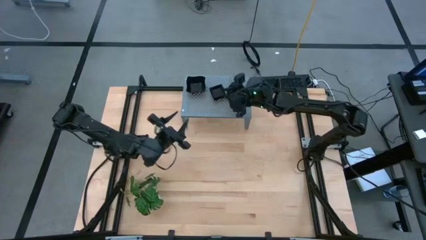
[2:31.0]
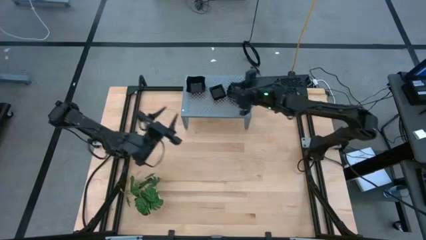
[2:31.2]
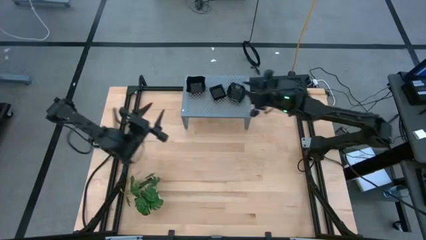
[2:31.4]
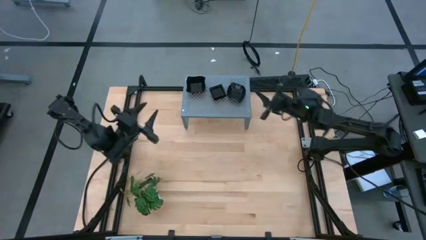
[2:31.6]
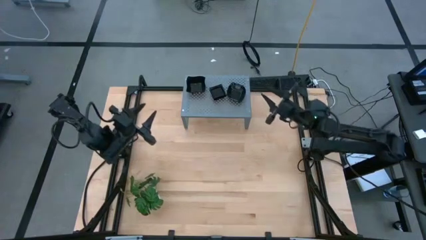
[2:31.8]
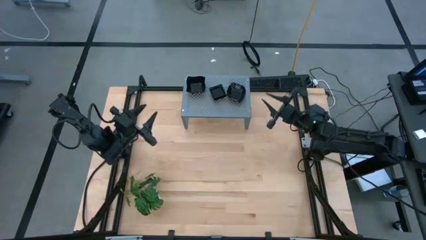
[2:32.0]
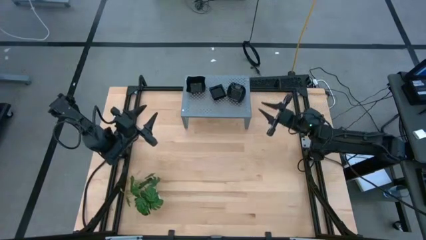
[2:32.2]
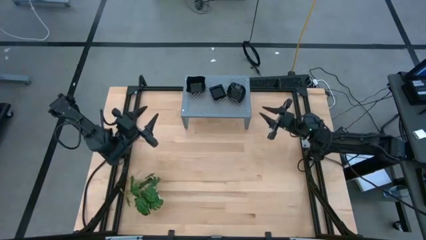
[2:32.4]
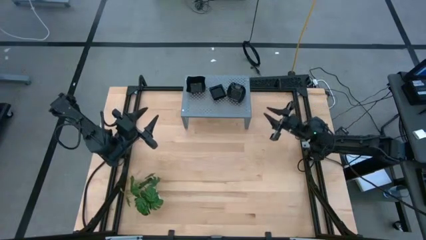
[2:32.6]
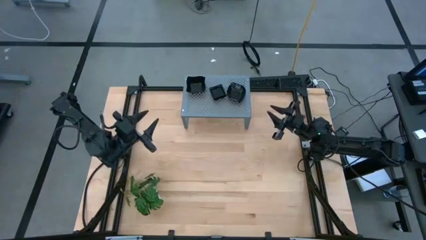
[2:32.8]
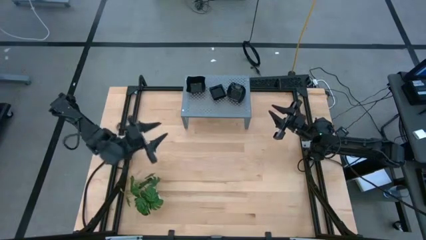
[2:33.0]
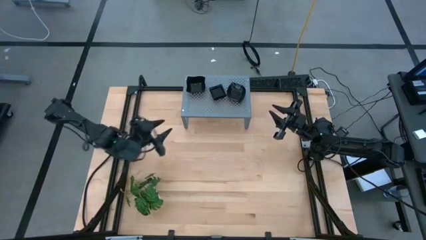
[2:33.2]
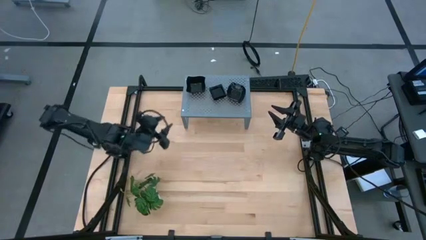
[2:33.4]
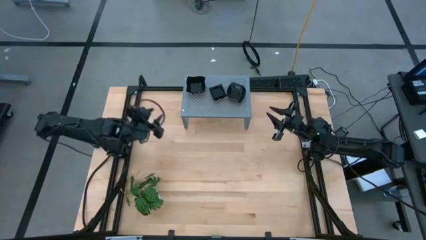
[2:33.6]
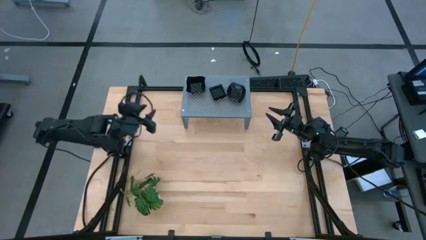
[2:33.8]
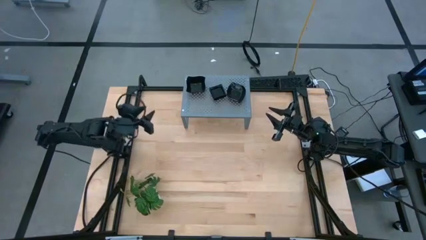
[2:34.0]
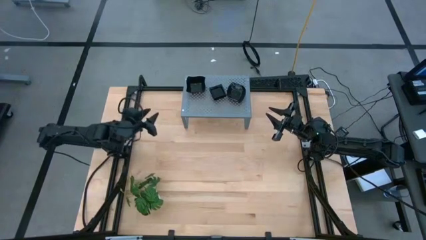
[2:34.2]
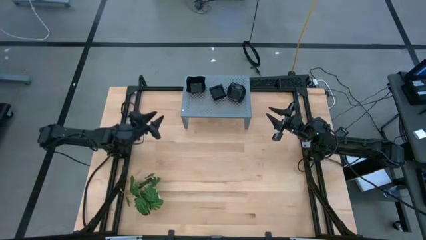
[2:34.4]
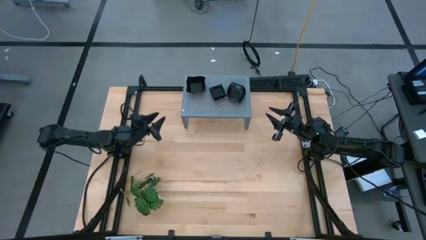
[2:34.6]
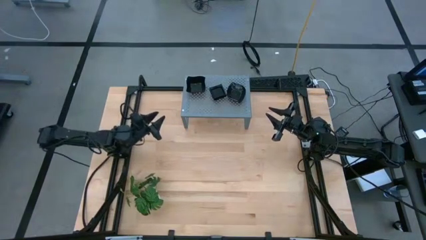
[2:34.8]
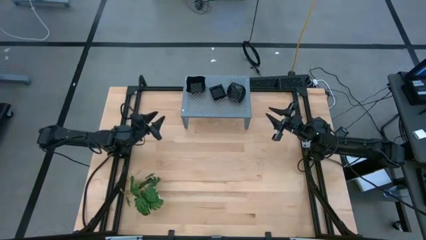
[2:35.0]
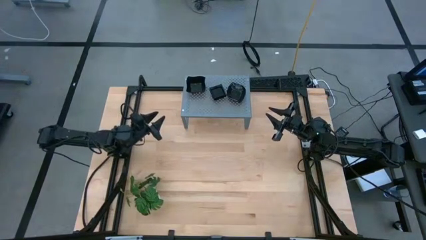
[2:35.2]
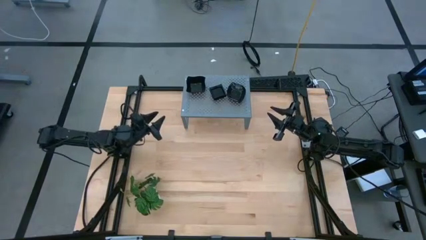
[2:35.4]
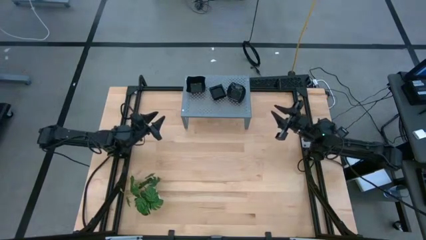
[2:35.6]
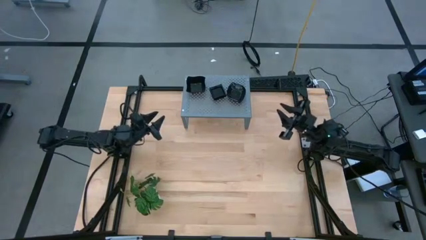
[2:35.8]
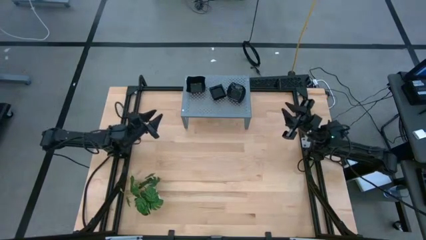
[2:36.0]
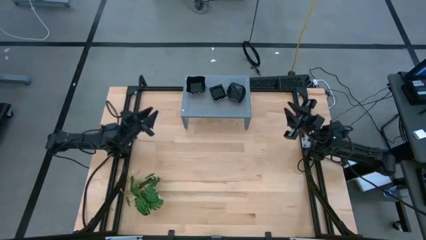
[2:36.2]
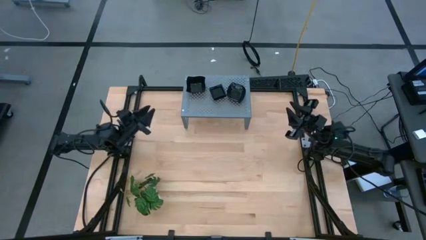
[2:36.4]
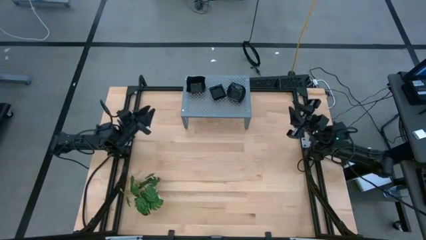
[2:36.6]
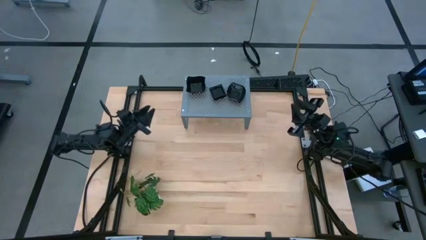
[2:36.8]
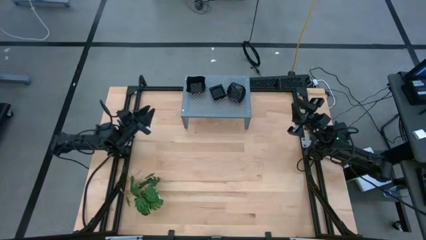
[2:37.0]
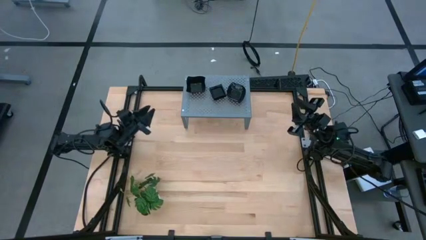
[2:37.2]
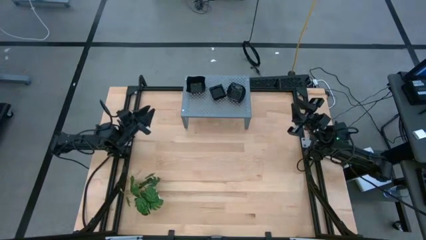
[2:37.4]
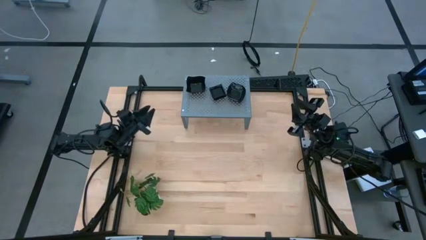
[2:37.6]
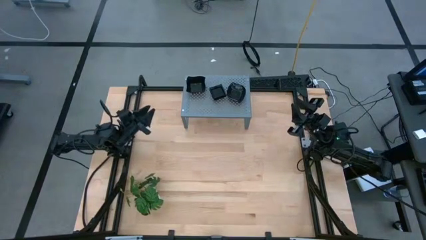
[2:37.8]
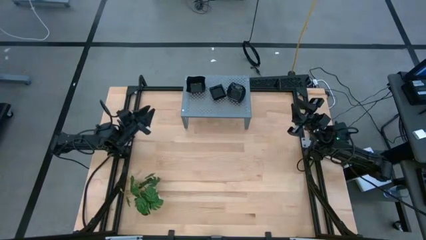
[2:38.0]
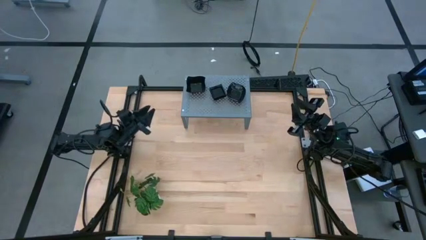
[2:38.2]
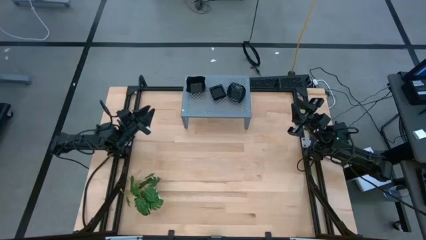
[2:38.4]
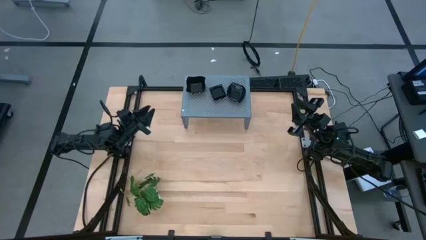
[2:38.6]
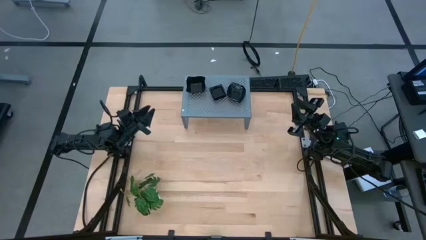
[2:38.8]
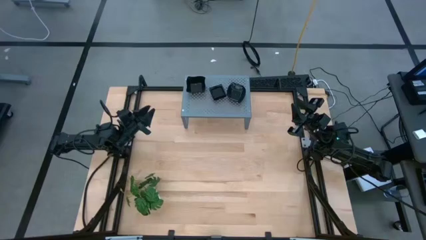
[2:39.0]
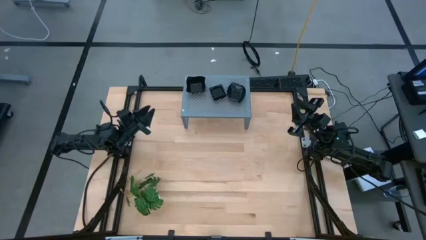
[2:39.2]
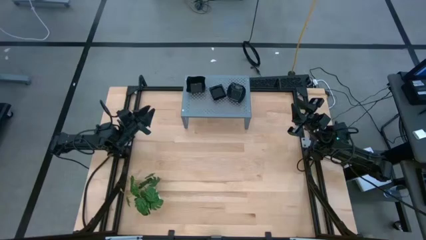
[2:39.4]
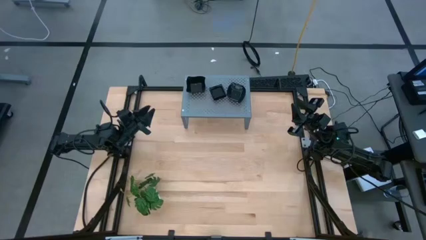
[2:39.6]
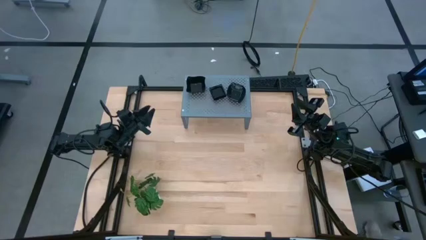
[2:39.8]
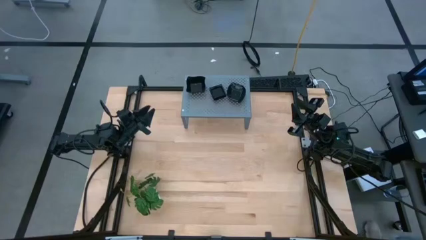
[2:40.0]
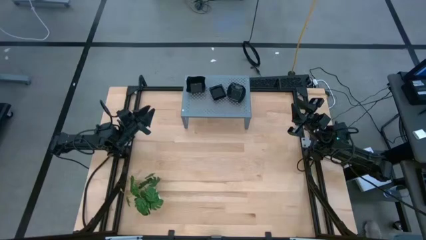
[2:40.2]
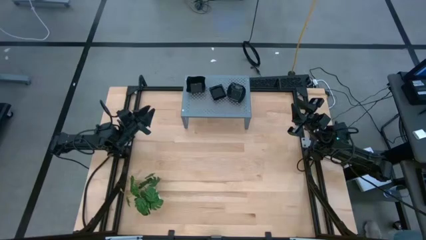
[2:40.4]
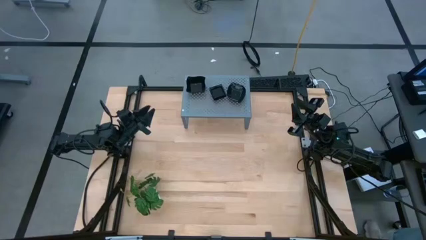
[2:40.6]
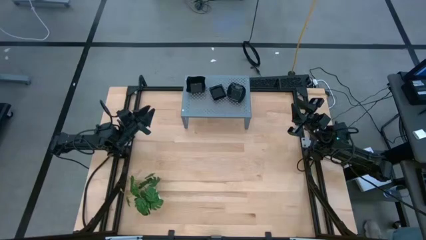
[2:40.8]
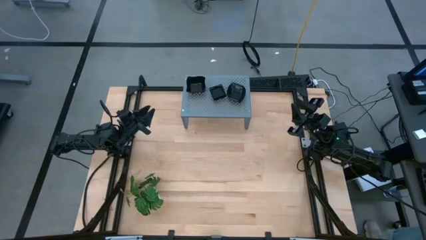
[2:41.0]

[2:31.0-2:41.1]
Task: Pick & Place Mini shaped plates
Return to Home Position
